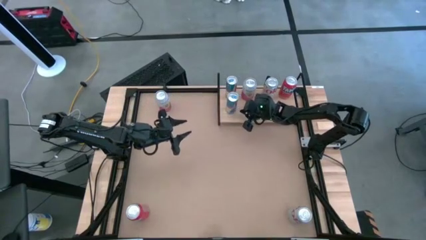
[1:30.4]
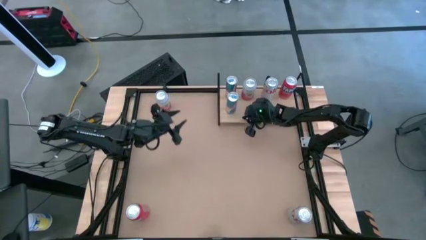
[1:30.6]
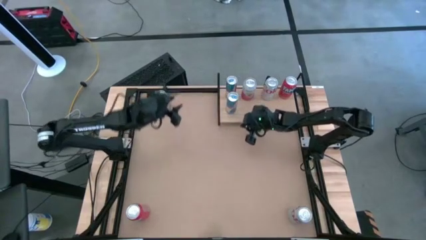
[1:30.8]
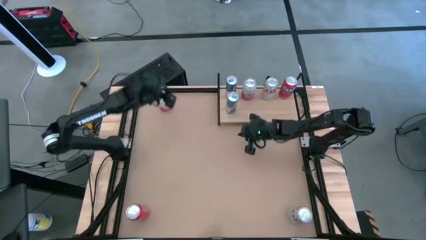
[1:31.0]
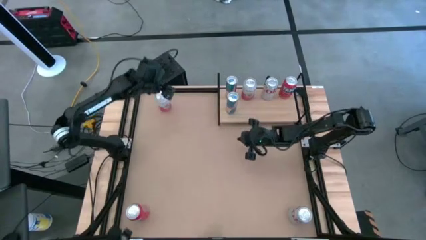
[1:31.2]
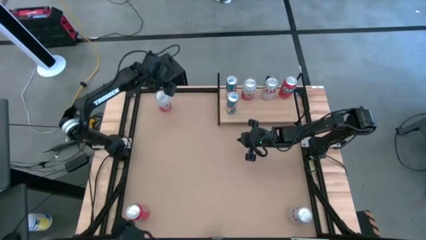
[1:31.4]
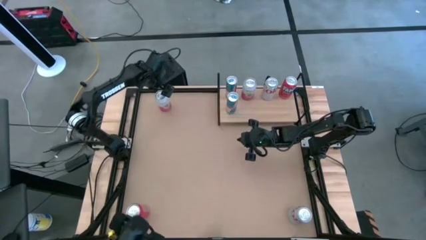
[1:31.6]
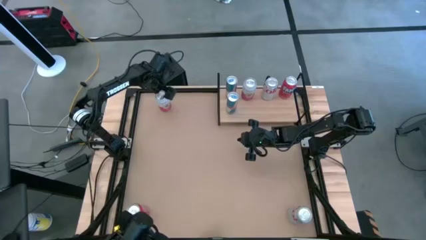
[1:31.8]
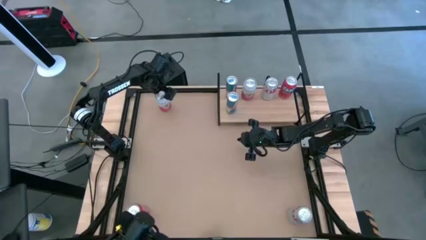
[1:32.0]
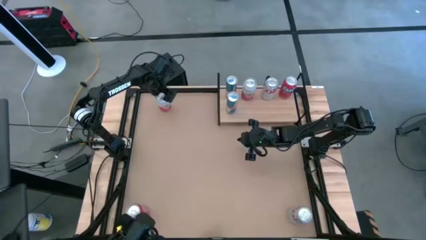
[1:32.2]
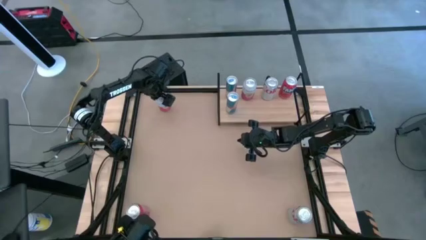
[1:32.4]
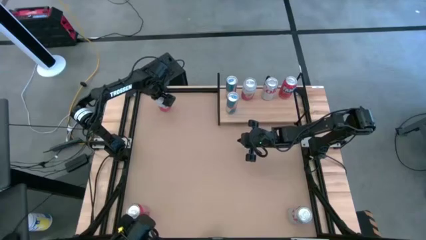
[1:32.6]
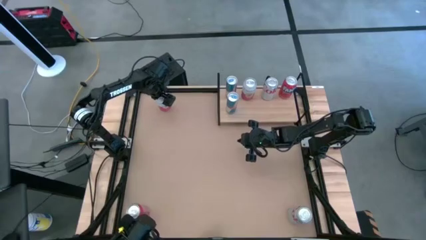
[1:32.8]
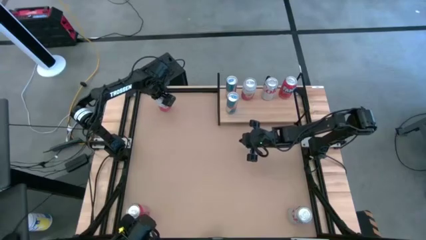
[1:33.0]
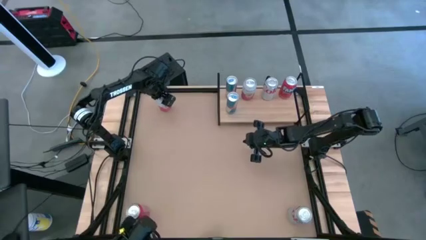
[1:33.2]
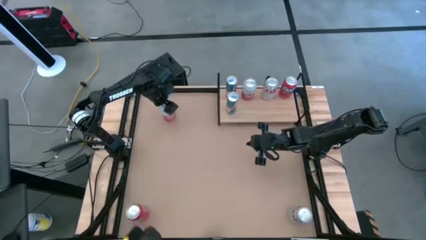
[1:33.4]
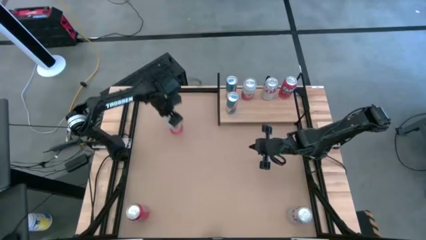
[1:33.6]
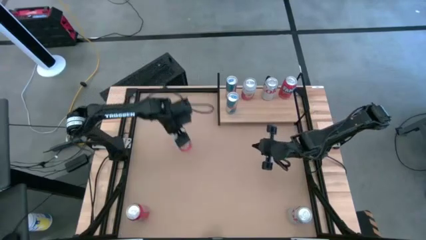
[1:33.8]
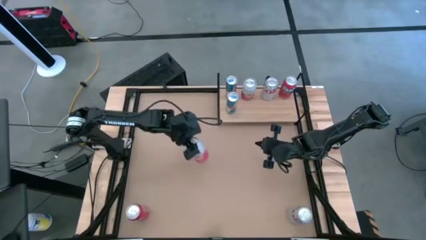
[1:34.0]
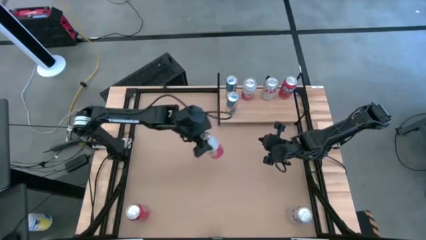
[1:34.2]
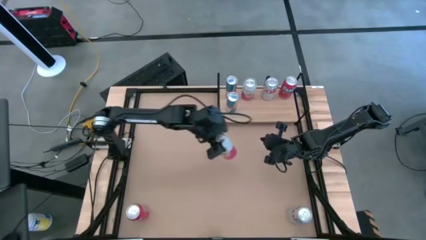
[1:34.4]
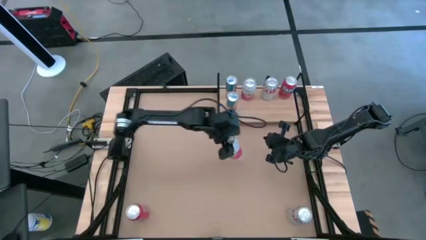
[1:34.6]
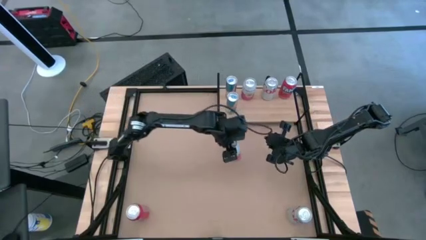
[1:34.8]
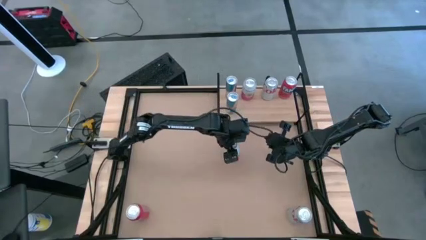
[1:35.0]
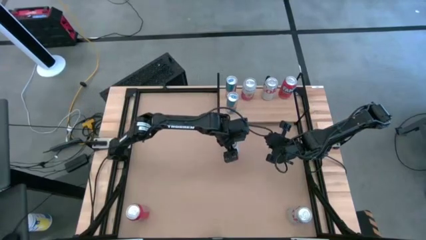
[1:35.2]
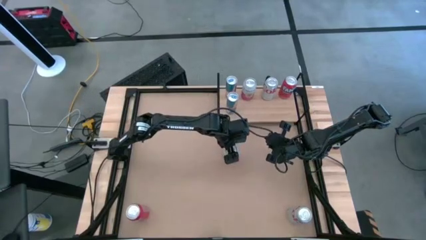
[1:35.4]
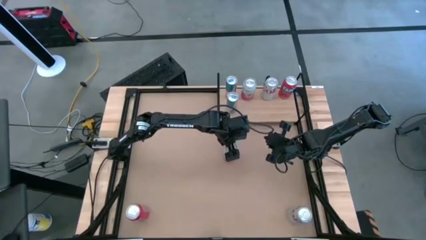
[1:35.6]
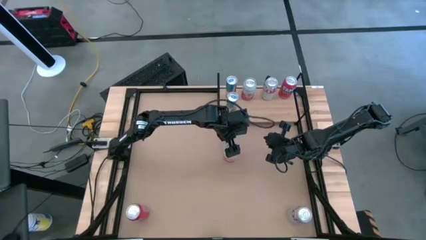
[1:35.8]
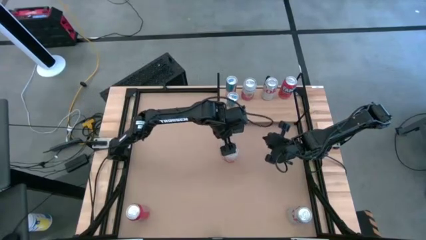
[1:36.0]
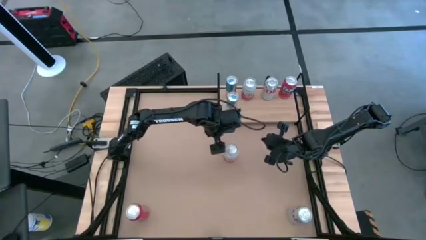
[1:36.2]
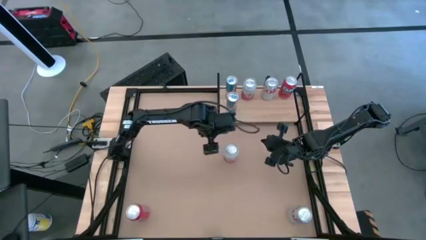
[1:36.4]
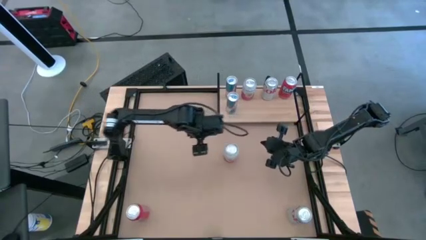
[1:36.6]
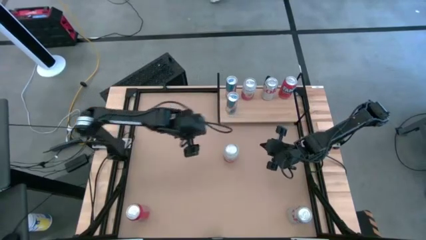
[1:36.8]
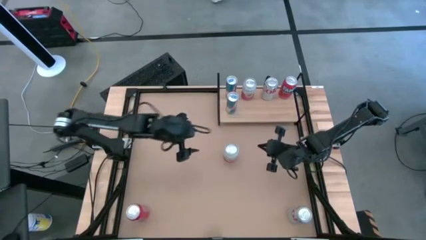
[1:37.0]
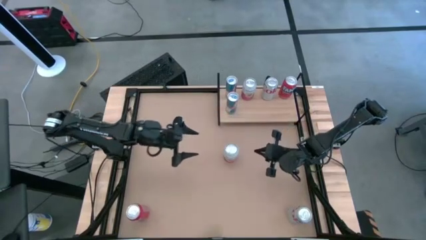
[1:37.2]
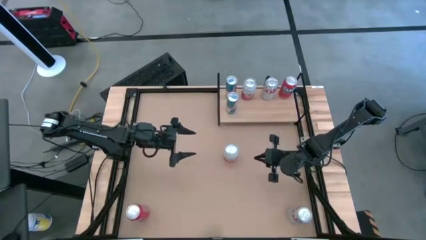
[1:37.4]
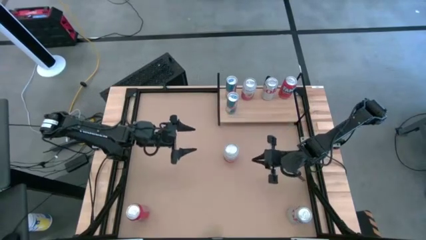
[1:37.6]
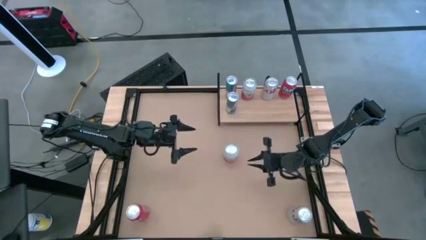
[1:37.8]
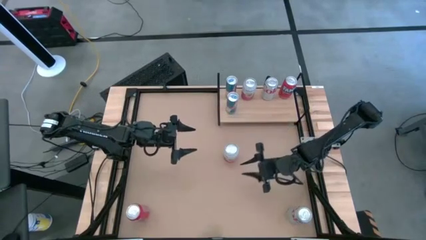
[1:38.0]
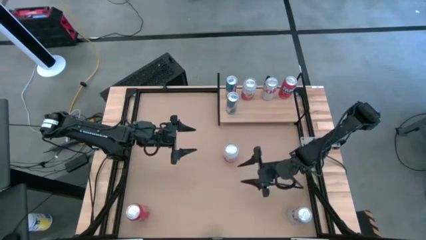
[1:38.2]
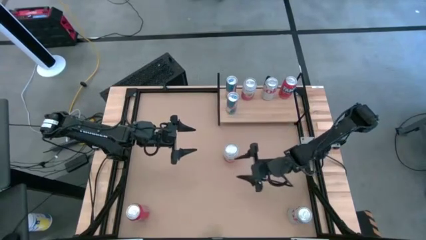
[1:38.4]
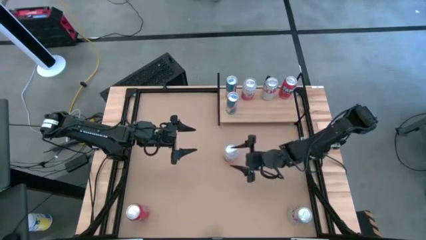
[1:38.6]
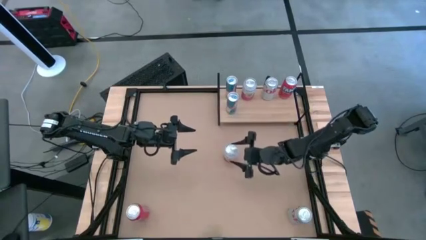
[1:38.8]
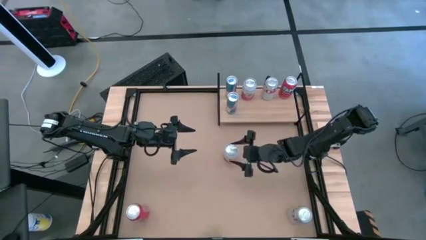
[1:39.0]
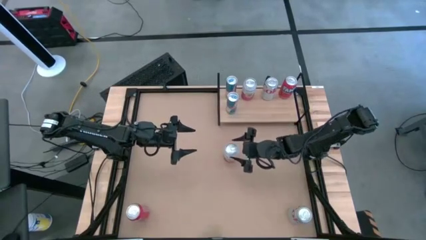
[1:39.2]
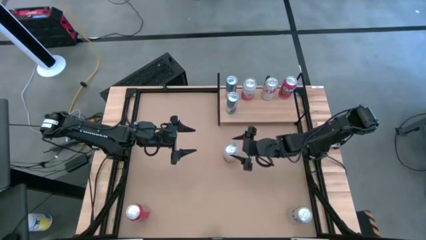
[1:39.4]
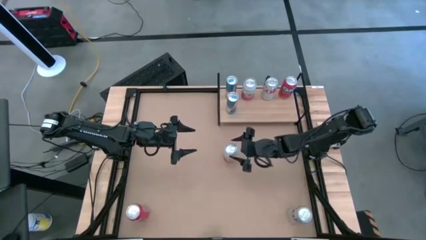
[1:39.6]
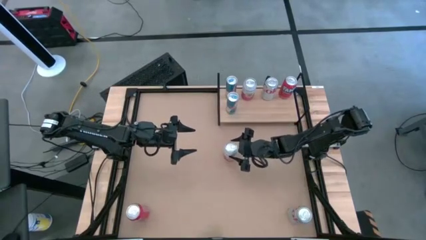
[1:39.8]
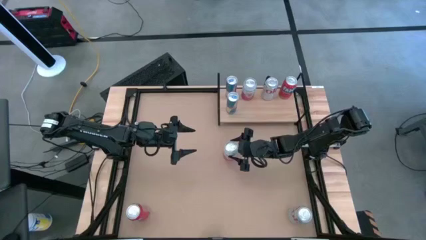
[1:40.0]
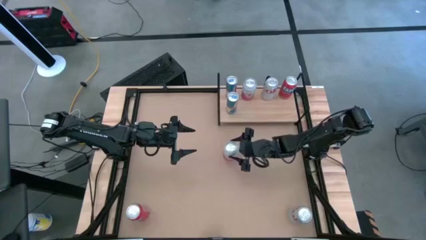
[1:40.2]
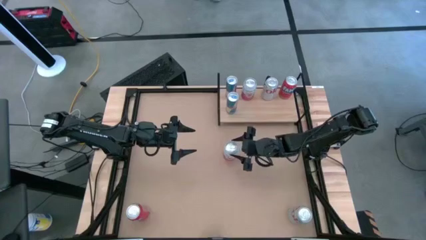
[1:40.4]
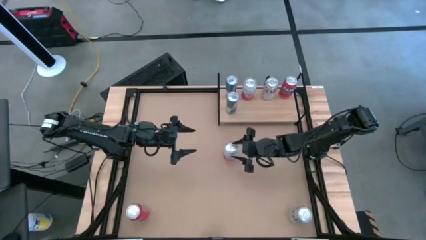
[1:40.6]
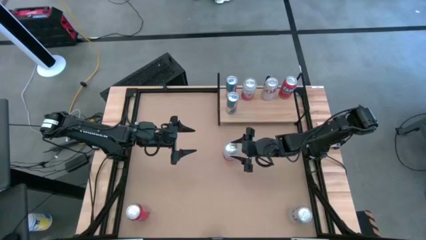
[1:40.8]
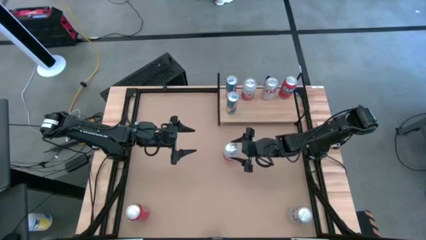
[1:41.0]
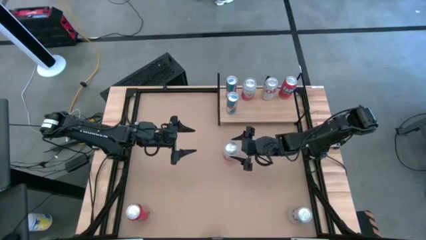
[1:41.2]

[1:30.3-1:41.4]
Task: Place canned beverage on shelf
Put the pink-white soda can on the shelf aligned with the pink-white soda can

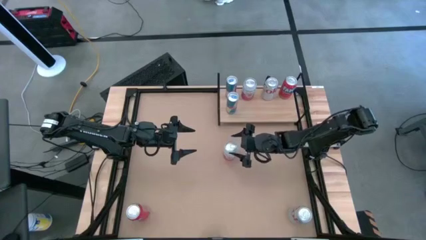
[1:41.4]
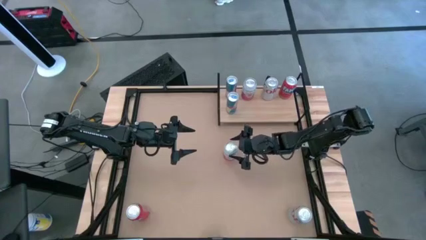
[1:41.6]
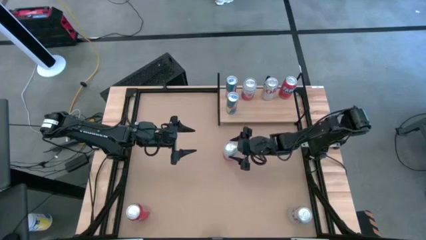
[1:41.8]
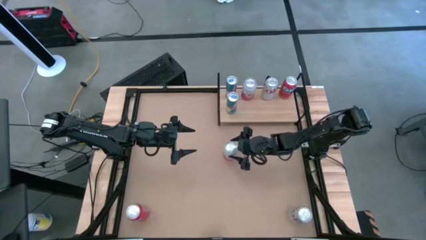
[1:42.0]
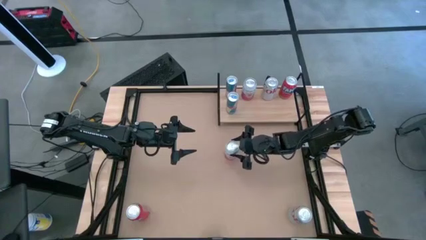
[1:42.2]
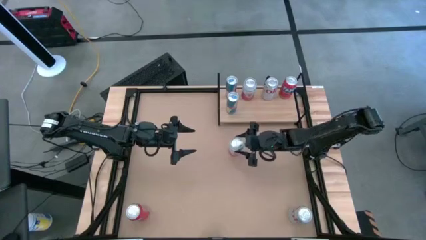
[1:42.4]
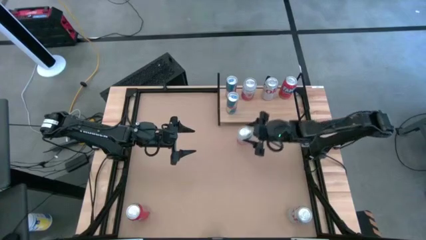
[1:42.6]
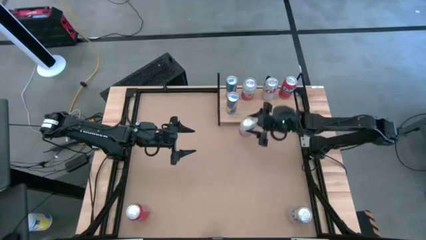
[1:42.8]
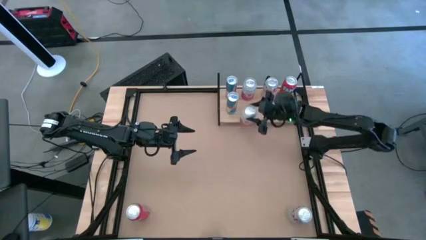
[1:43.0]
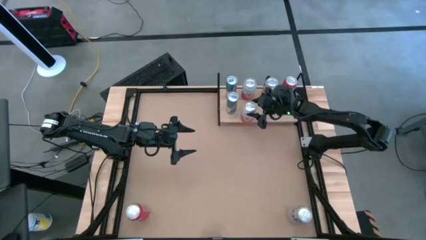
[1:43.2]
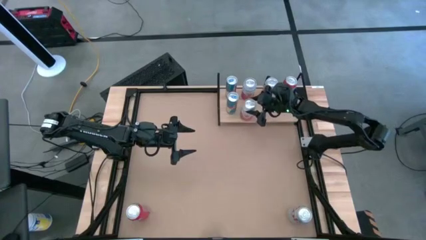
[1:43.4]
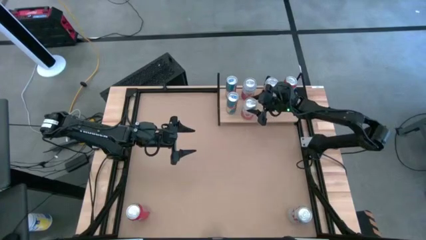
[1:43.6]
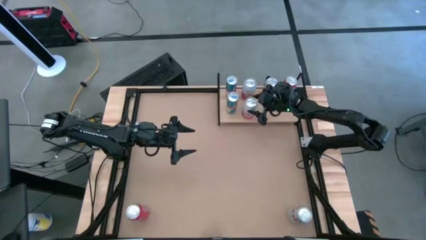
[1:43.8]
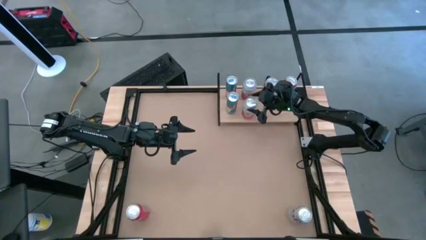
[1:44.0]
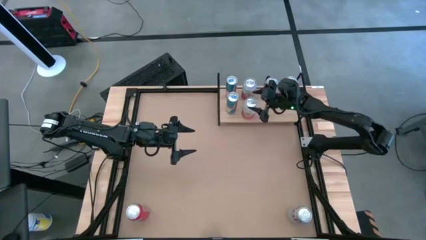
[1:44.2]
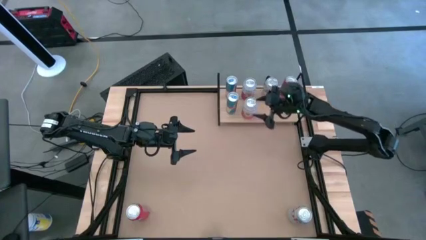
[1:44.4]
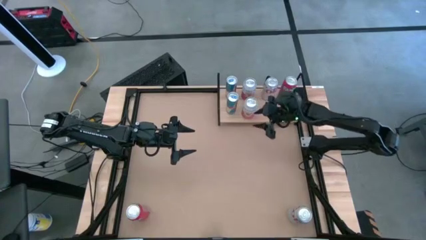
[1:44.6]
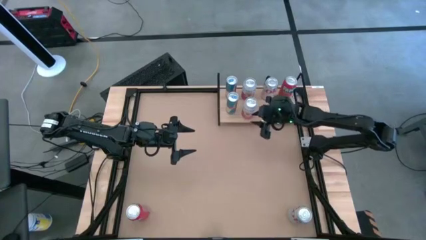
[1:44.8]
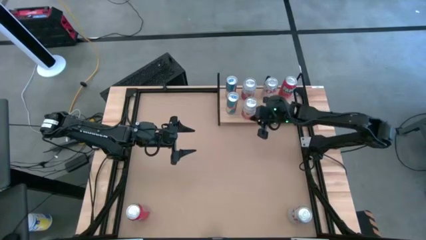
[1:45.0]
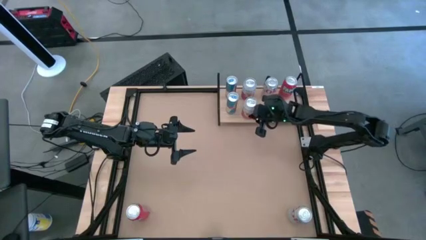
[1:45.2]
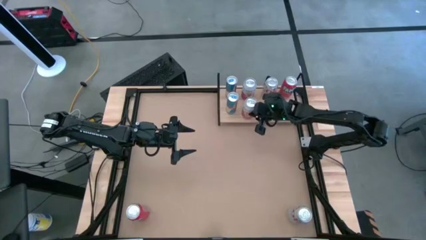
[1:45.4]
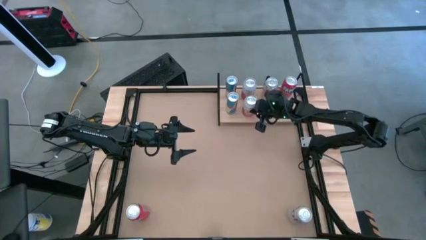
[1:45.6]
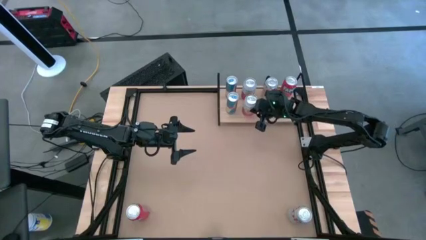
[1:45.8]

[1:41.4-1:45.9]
Put the pink-white soda can on the shelf aligned with the pink-white soda can
